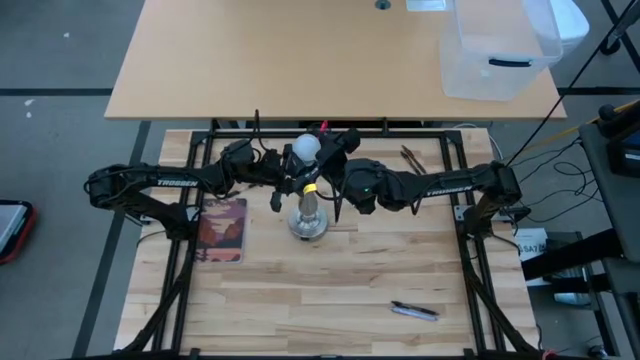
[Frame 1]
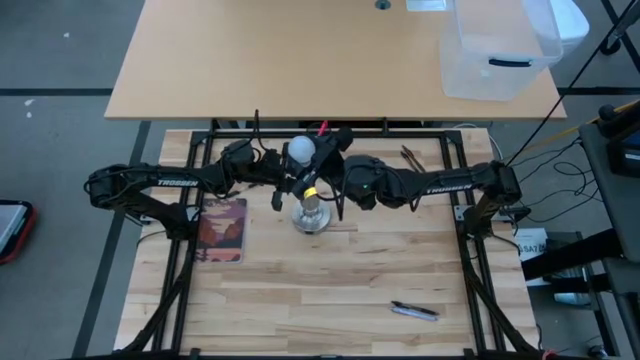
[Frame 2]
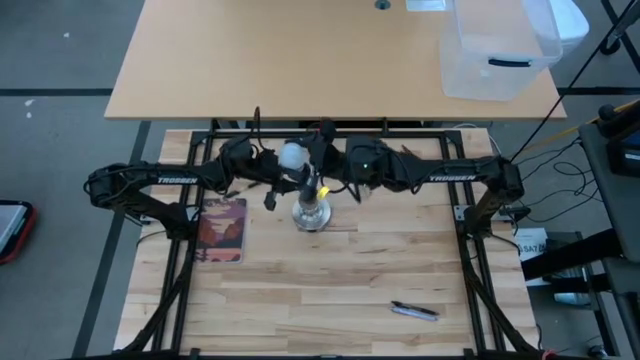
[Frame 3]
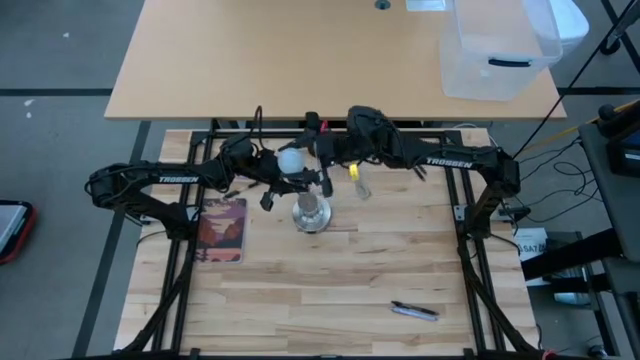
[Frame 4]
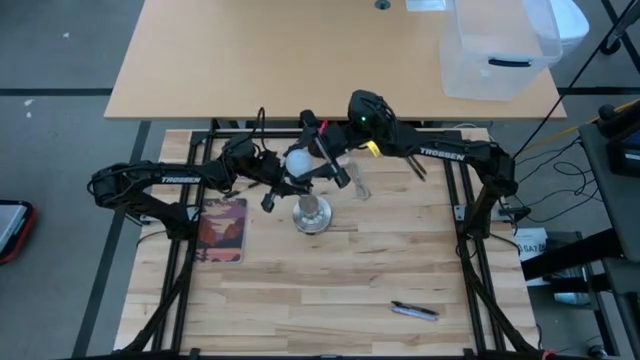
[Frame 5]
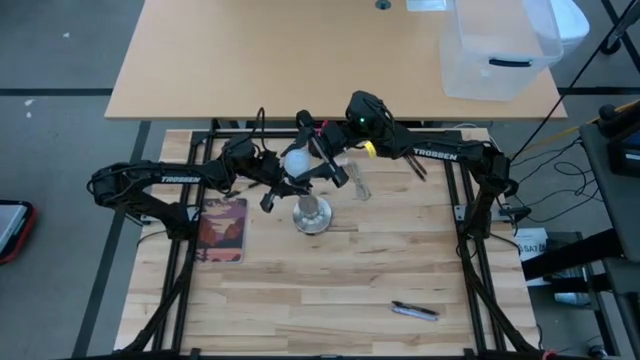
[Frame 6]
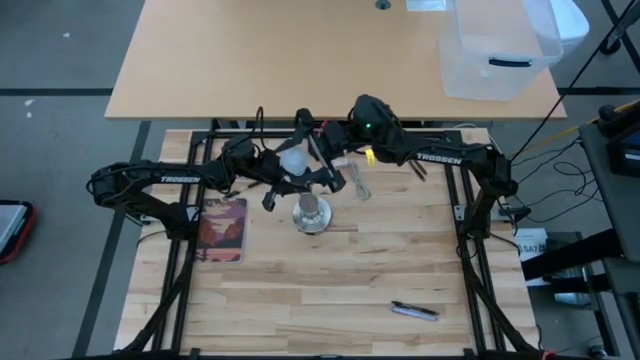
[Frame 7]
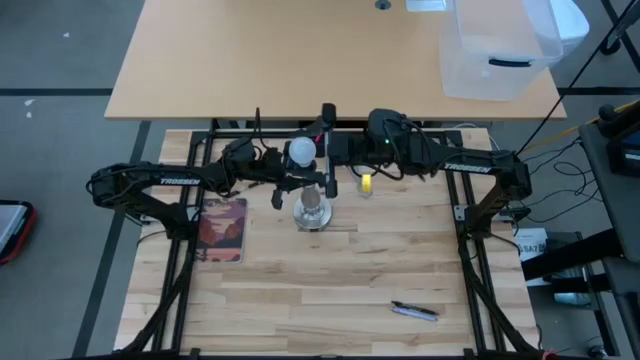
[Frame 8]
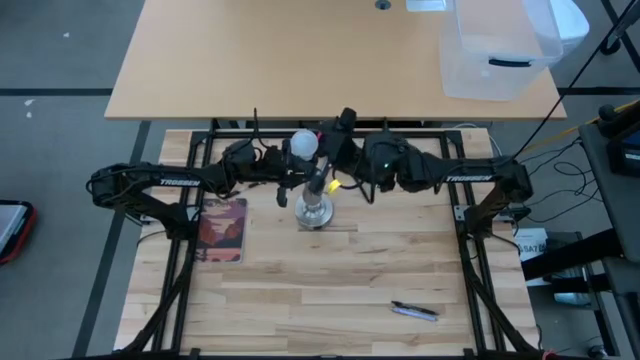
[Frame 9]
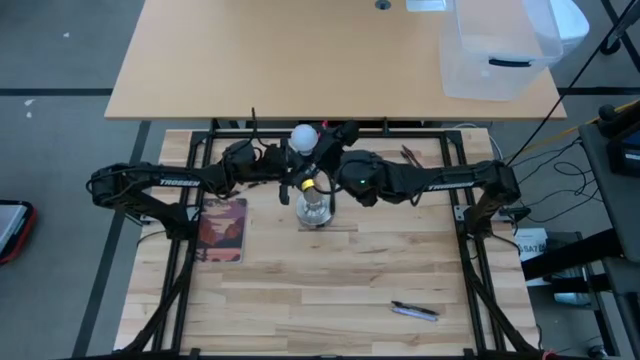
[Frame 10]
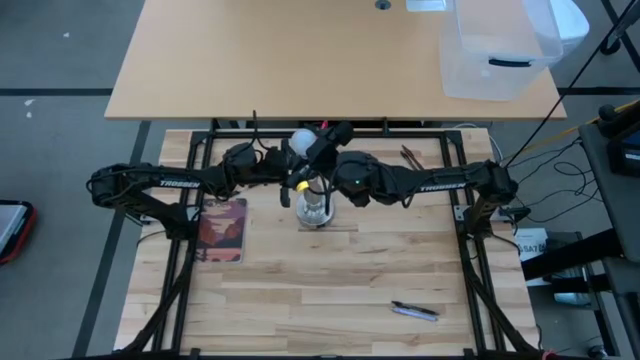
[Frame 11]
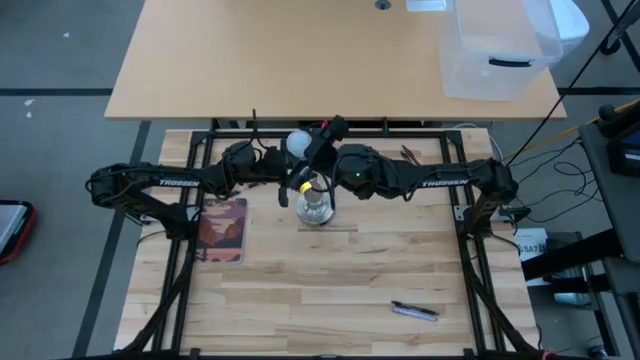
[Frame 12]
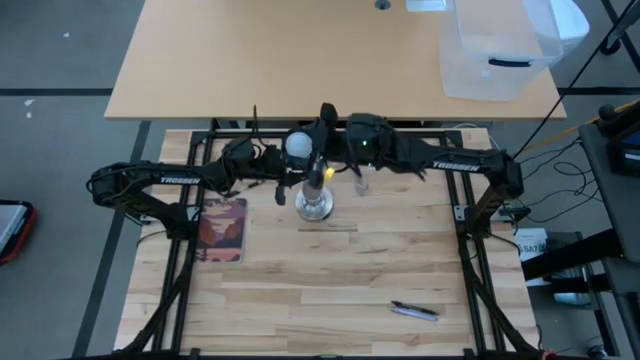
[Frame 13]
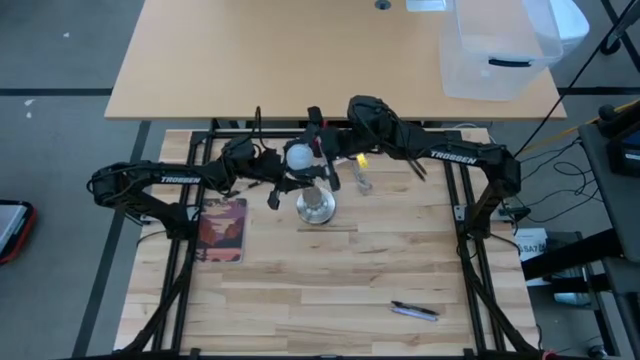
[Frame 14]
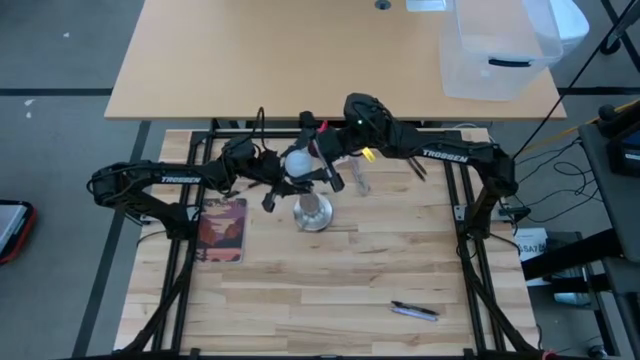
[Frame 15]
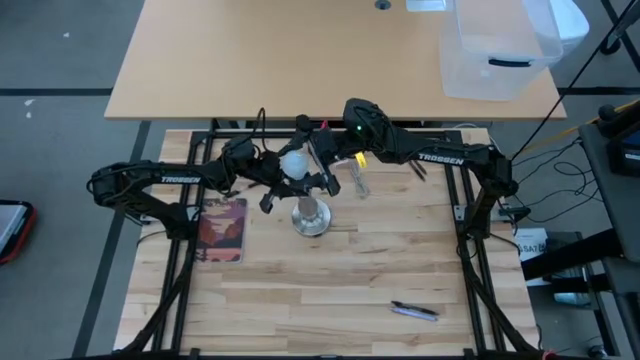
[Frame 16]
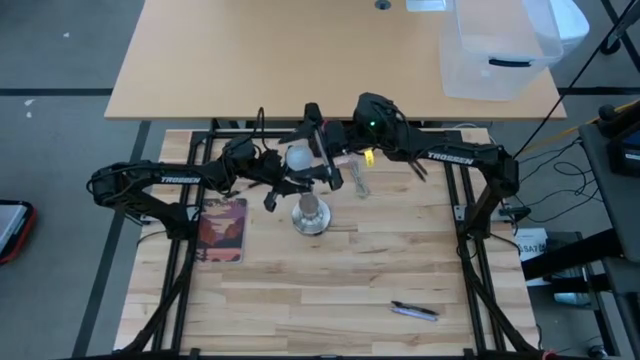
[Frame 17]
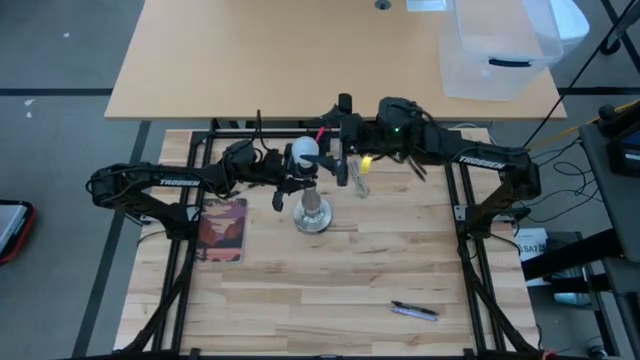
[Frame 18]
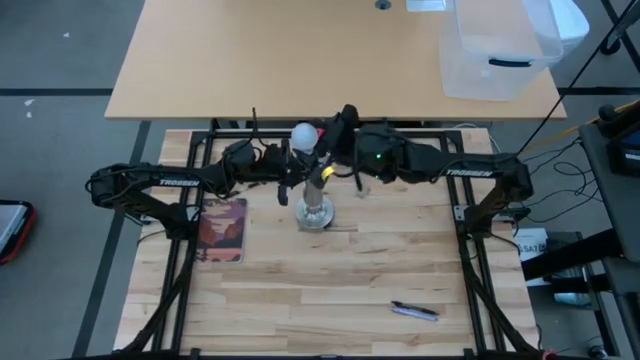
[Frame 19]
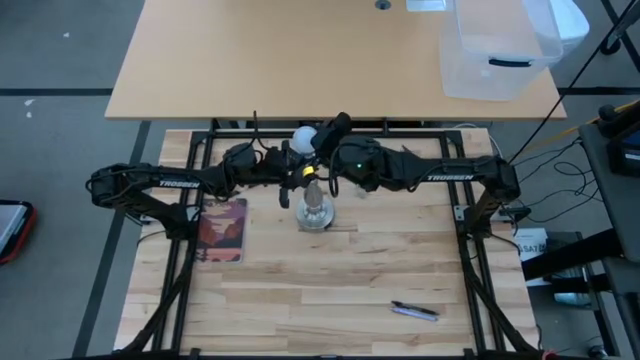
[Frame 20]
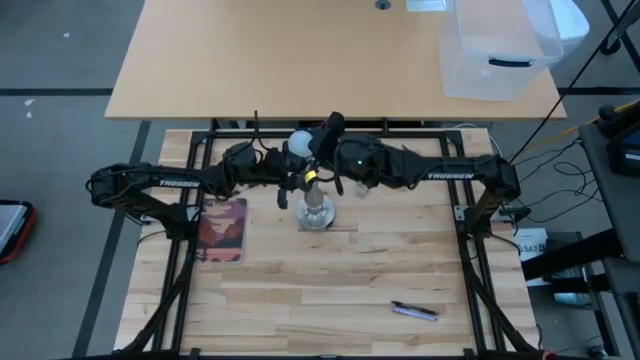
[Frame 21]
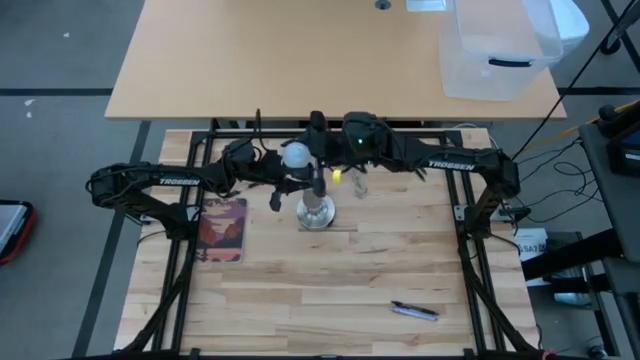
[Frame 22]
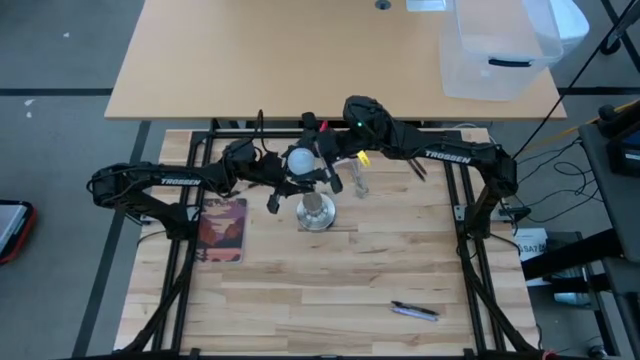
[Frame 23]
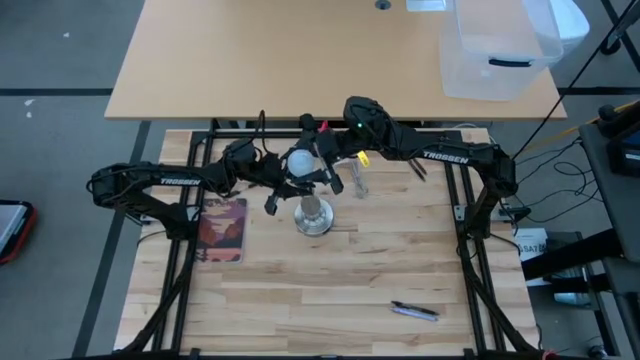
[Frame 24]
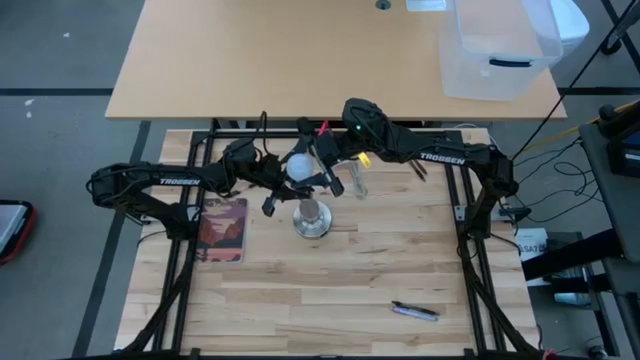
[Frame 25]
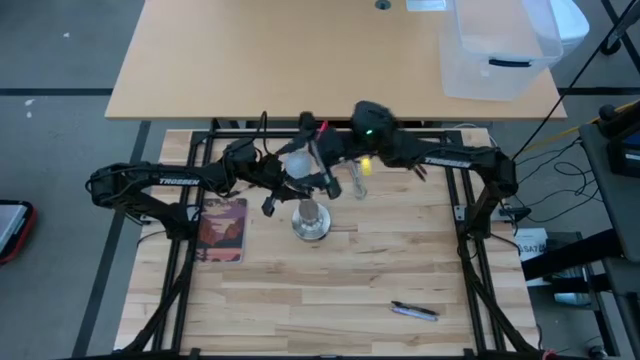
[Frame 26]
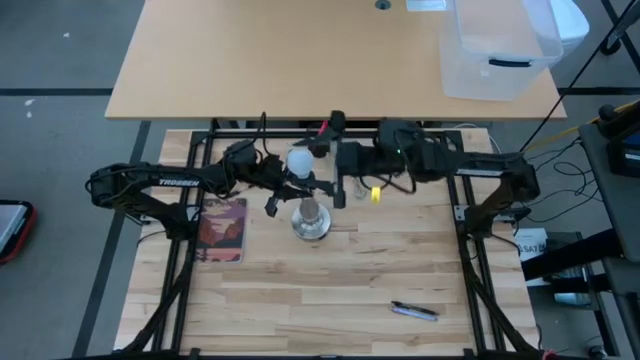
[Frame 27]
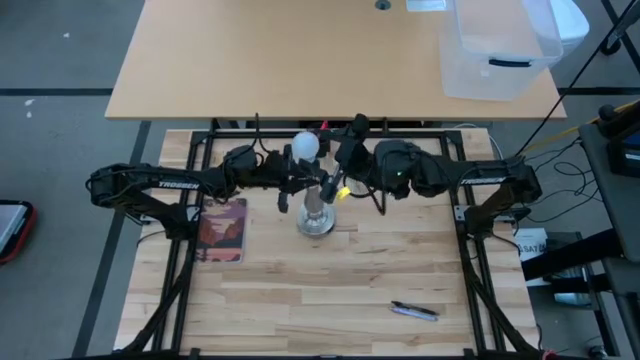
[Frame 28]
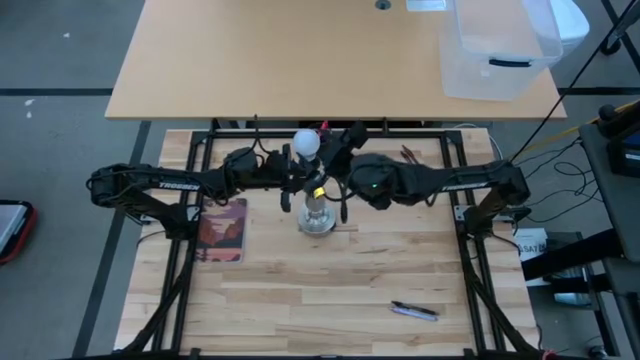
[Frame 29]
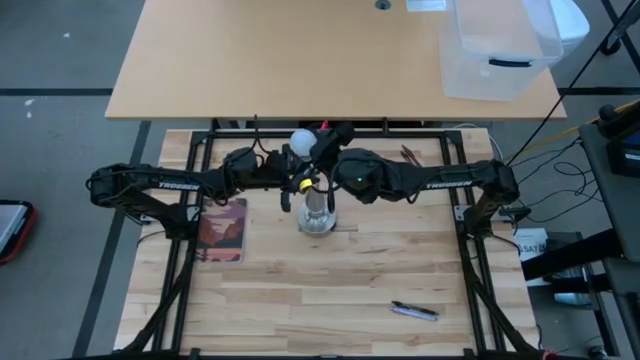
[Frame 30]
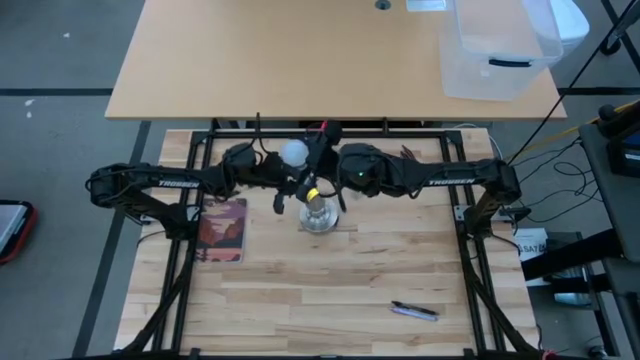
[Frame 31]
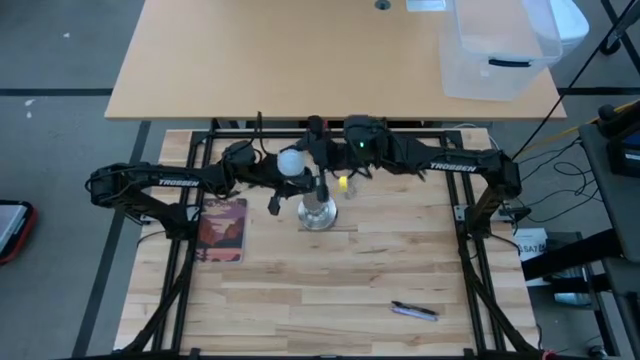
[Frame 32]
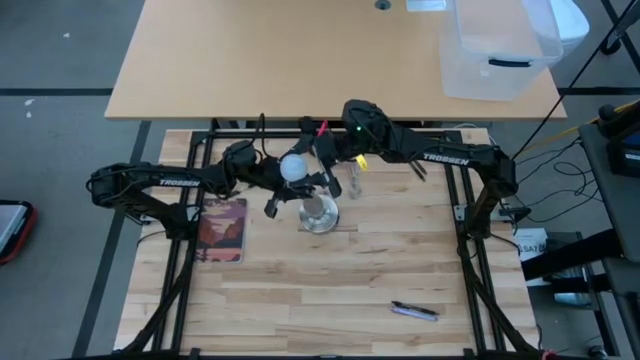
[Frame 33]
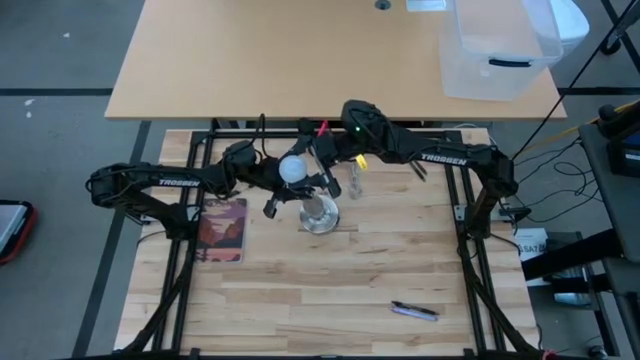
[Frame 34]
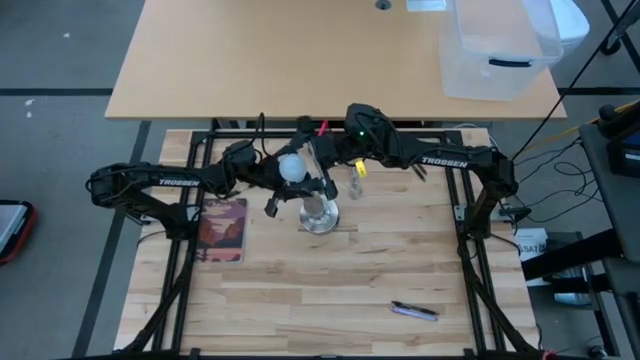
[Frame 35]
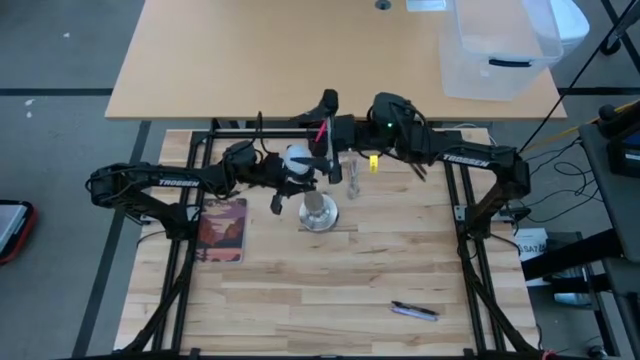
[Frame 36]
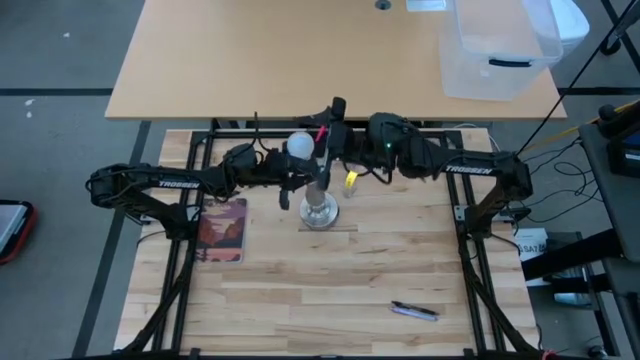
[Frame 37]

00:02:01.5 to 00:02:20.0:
Task: Screw lightbulb
Remove the lightbulb from the desk lamp

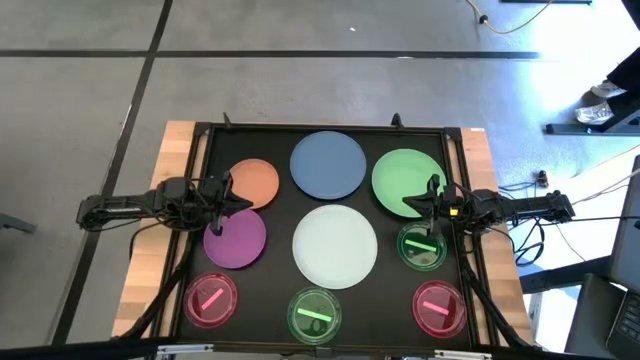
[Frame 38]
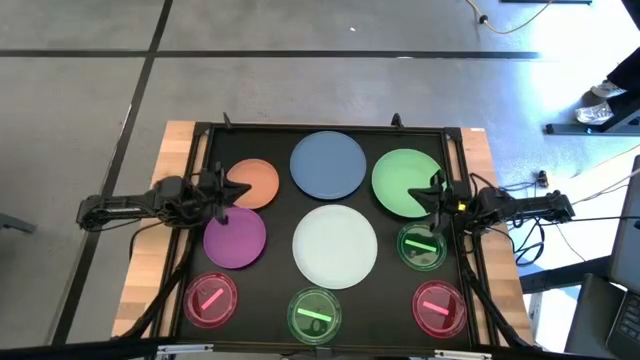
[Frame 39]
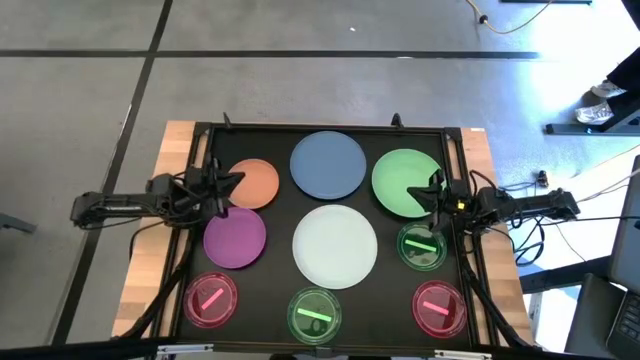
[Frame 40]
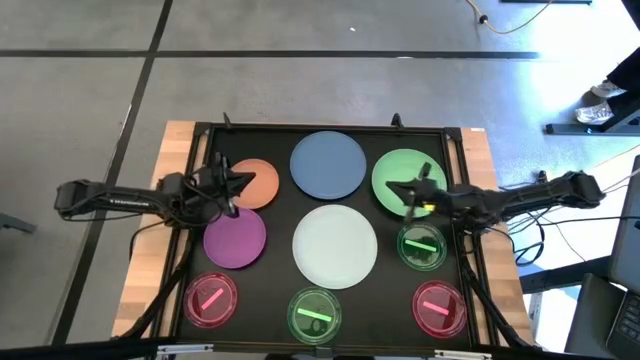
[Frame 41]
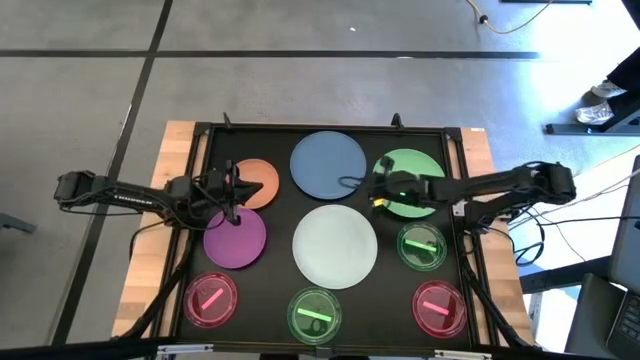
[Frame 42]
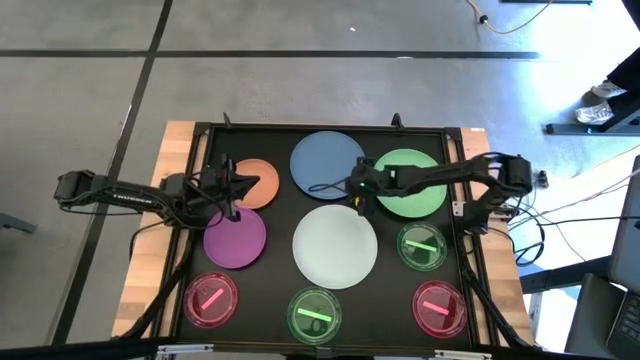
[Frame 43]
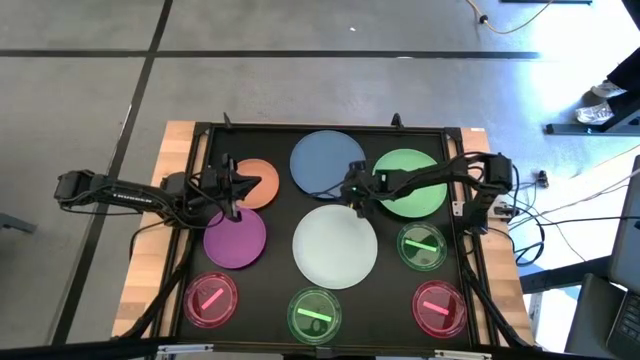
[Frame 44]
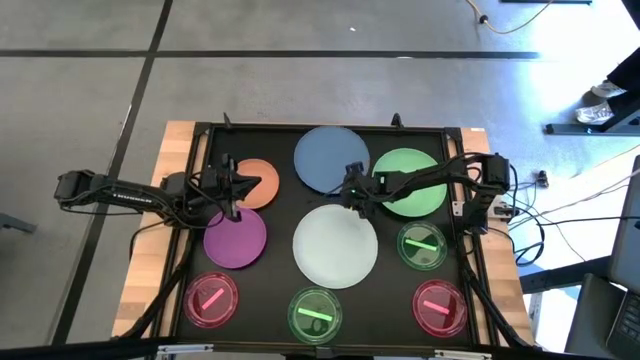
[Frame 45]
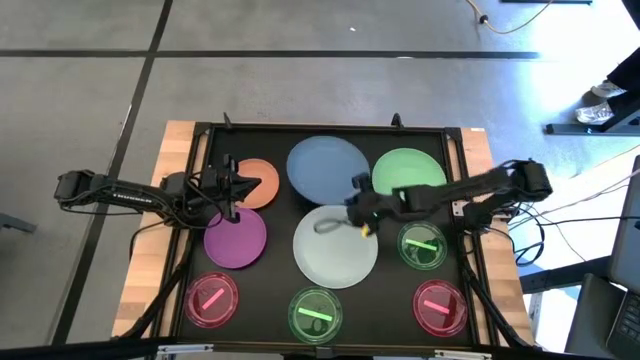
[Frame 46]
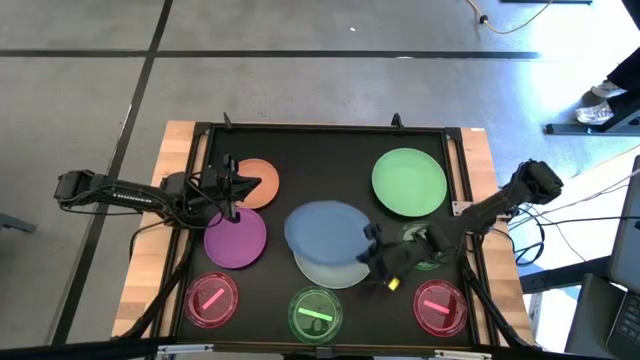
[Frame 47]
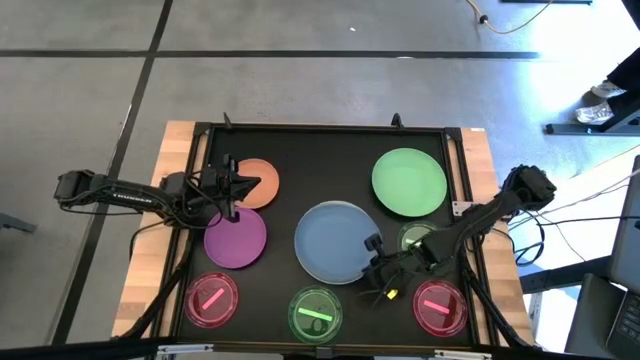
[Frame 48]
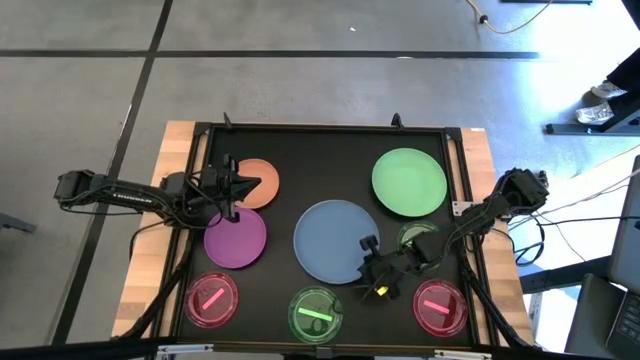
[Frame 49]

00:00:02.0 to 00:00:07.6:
Task: Stack plastic plates
Stack the blue plate on top of the light blue plate
